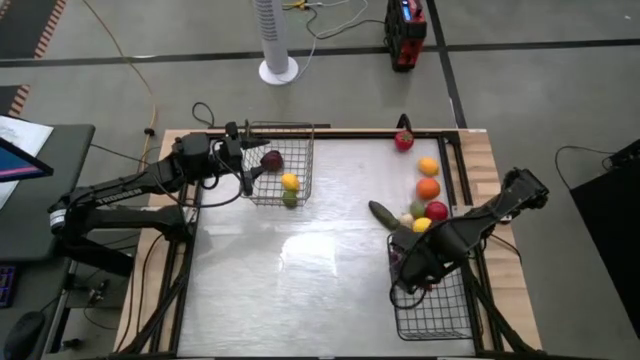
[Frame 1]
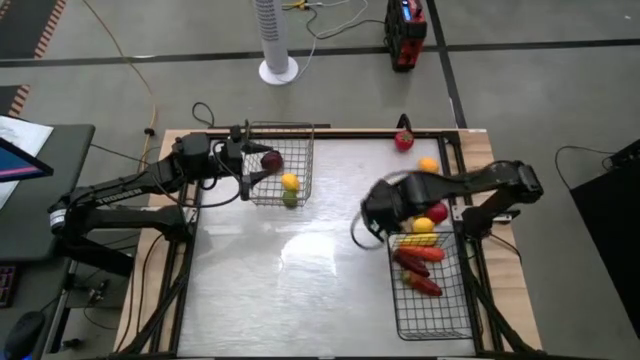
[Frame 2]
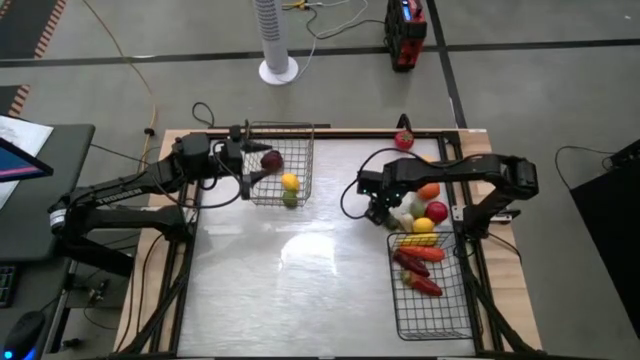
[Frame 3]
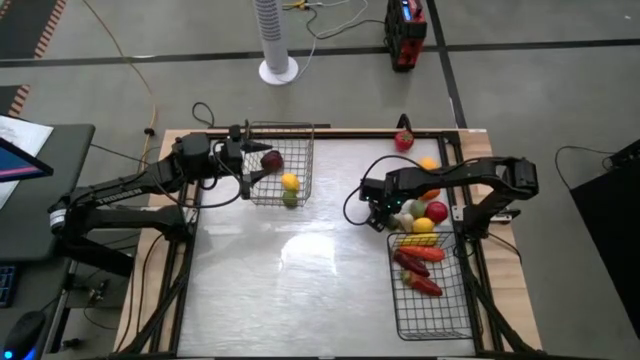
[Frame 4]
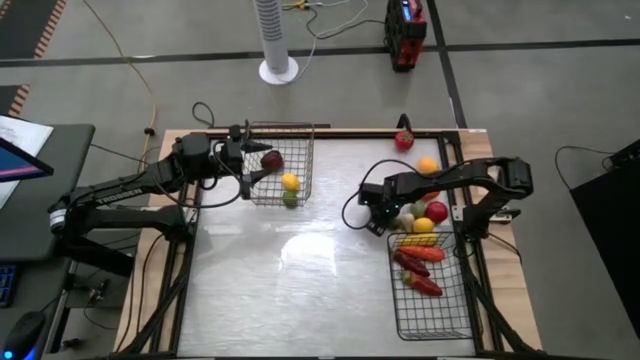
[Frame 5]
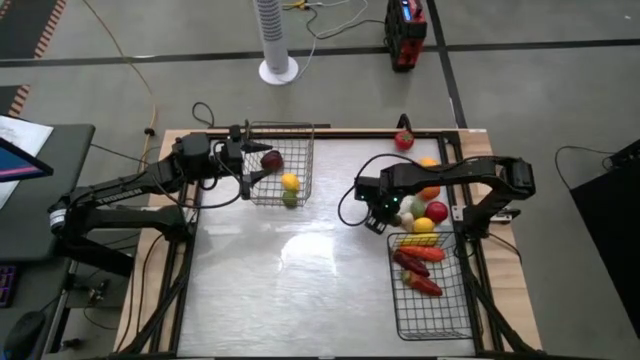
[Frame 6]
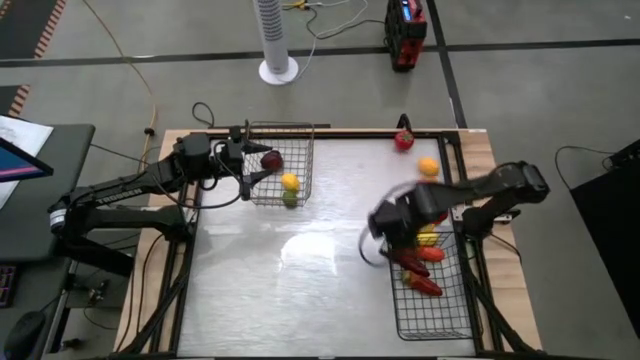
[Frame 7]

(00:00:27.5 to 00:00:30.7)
Task: Sort produce into baskets
Put the green bell pepper into the right wire basket

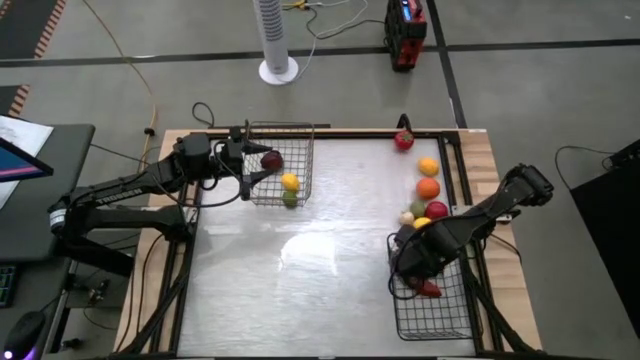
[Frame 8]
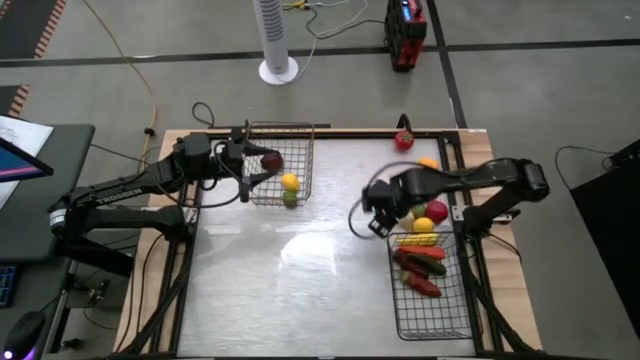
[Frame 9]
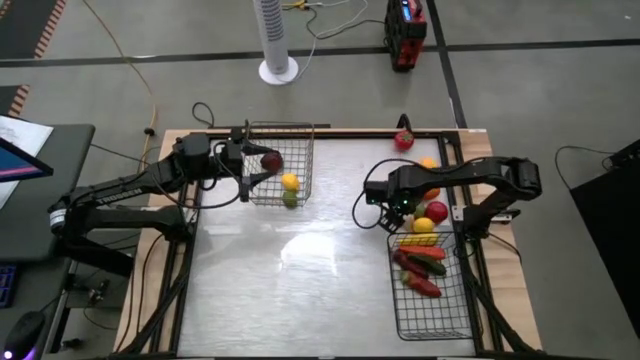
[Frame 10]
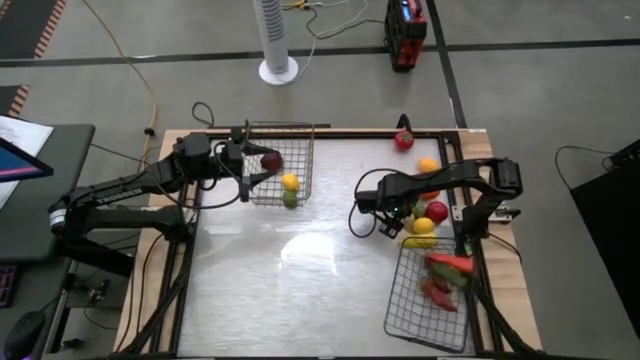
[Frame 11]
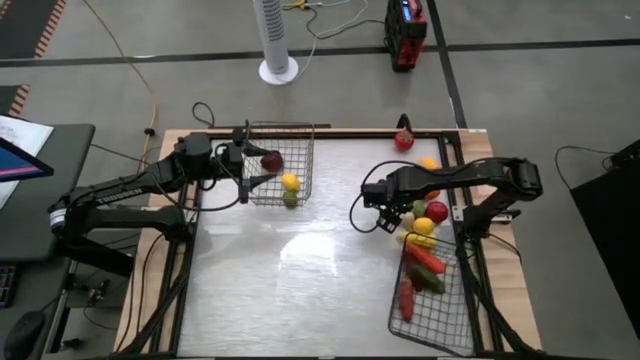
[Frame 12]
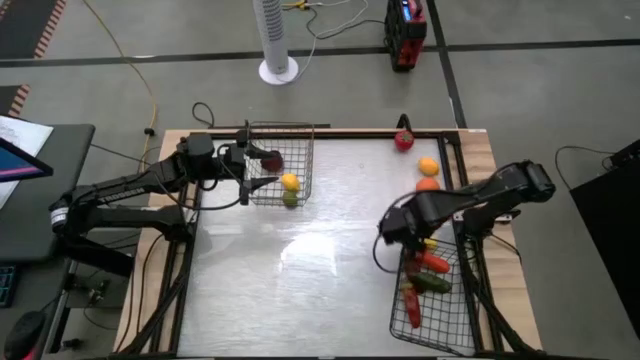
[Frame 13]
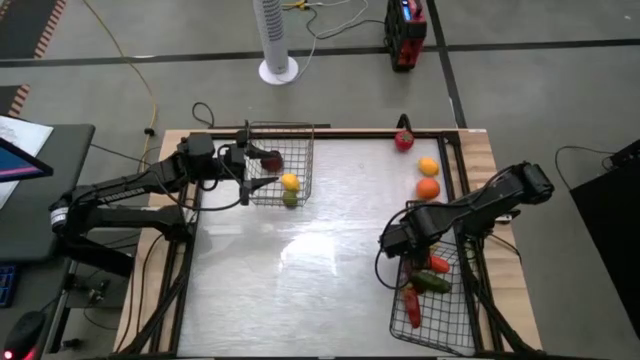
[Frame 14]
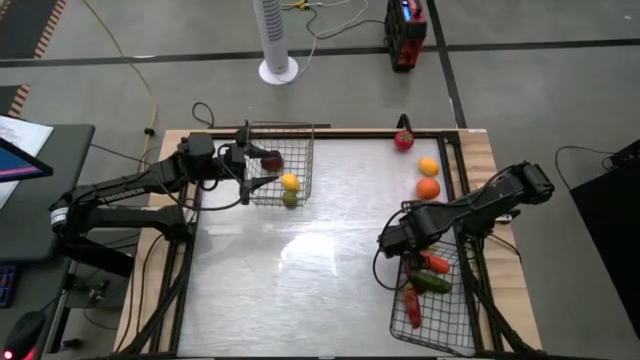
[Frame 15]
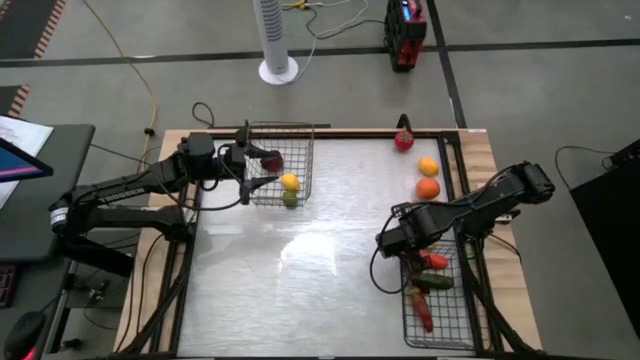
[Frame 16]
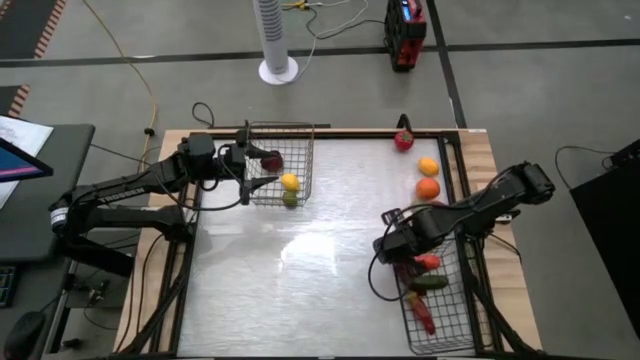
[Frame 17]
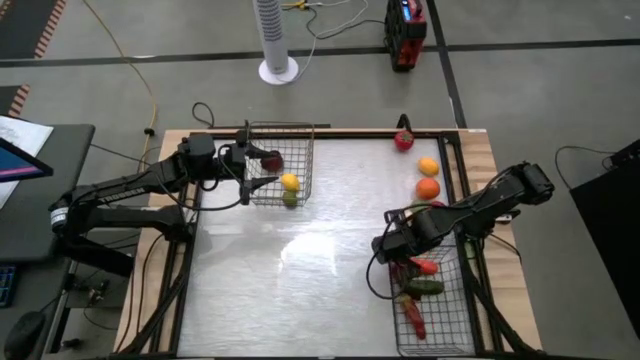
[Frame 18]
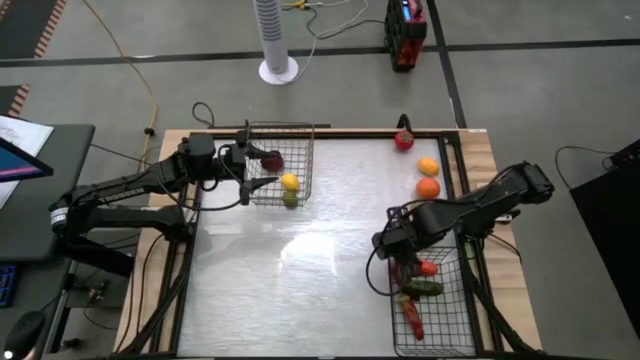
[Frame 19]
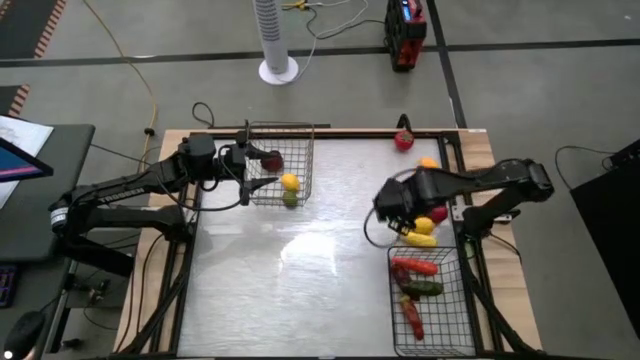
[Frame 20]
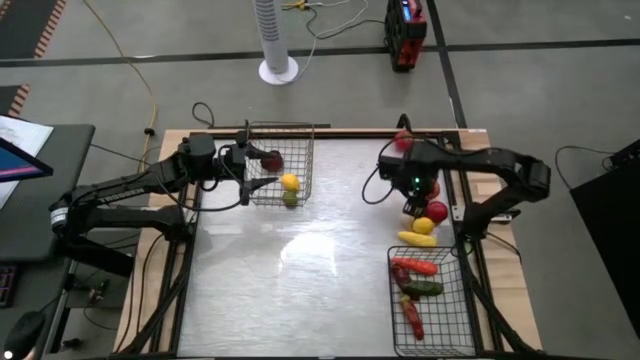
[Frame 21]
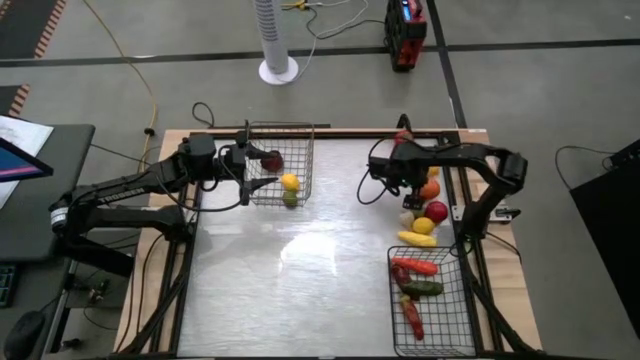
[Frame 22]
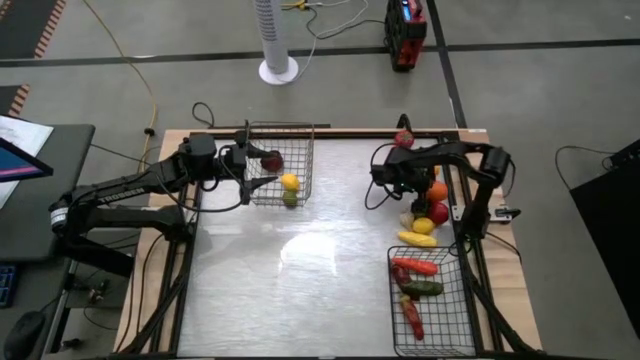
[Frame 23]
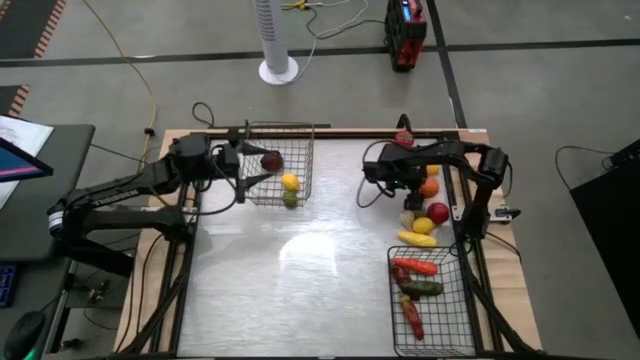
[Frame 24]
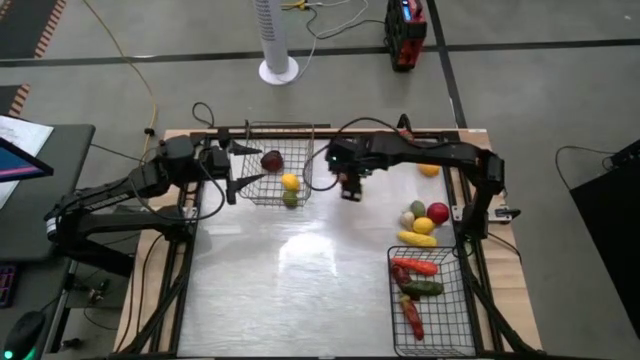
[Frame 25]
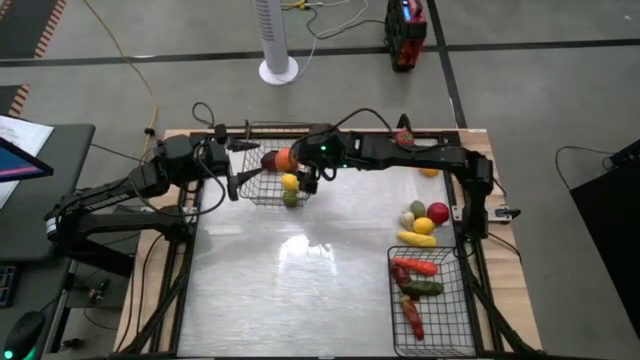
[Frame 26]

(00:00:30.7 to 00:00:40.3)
Put the orange into the left wire basket

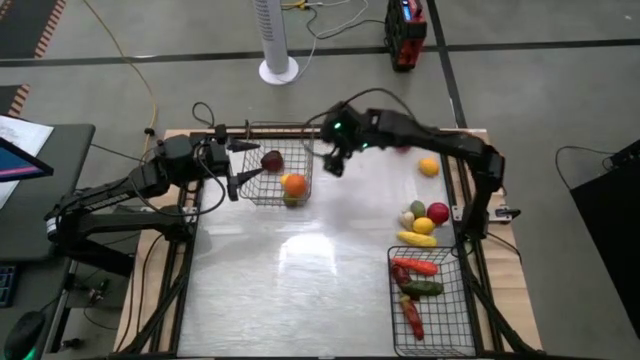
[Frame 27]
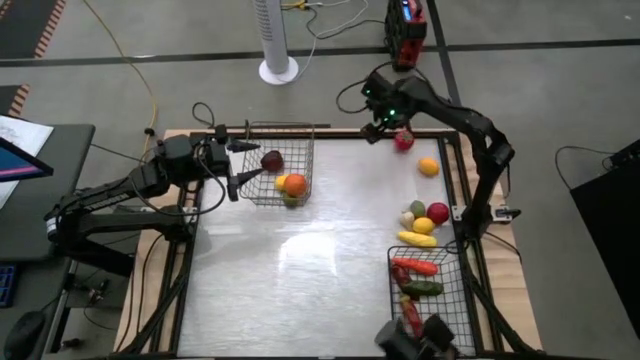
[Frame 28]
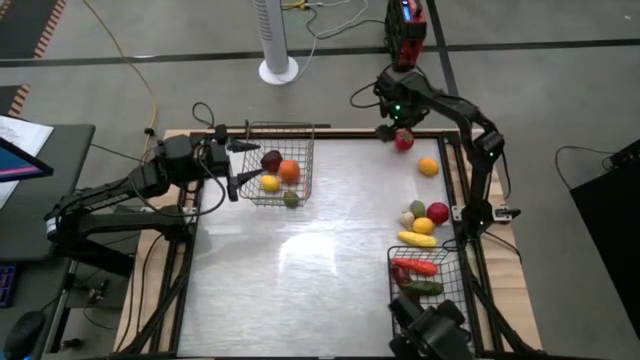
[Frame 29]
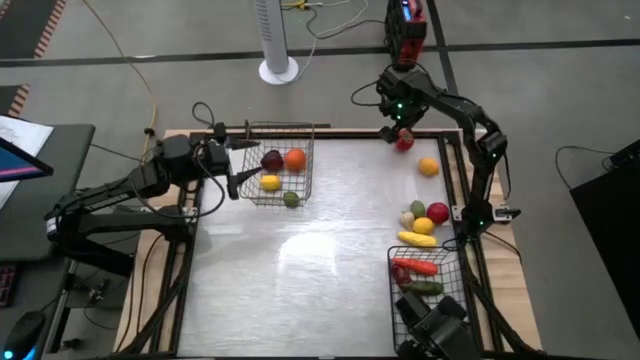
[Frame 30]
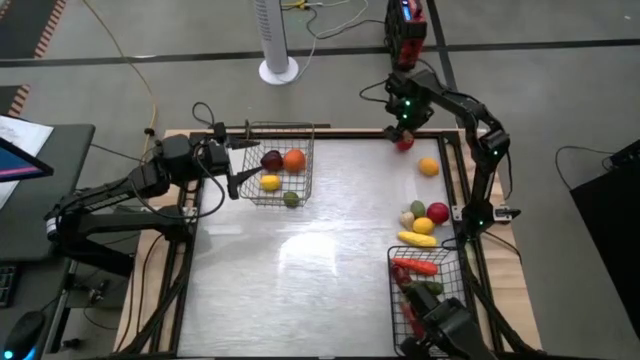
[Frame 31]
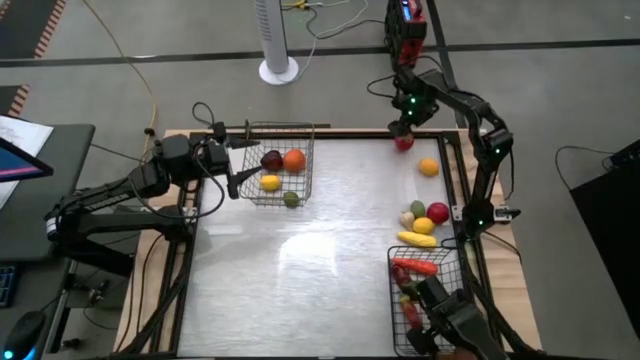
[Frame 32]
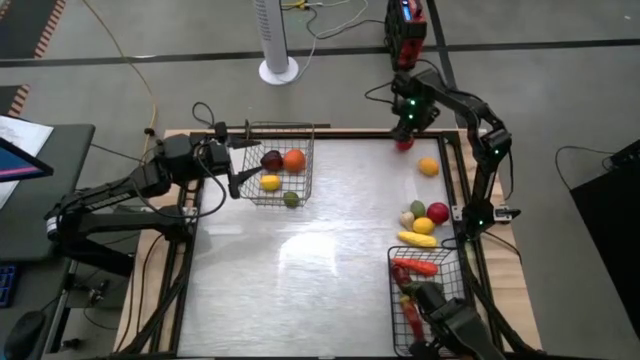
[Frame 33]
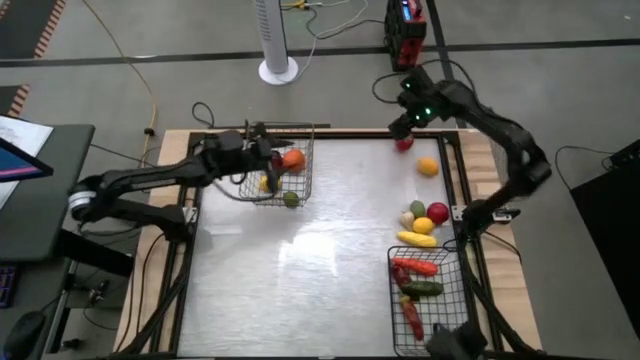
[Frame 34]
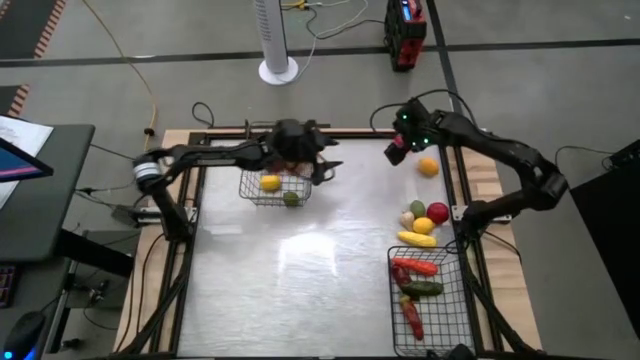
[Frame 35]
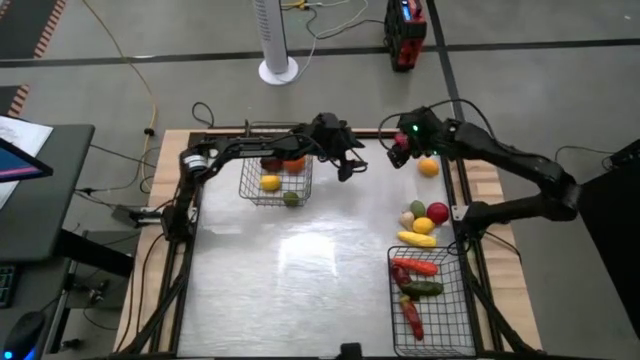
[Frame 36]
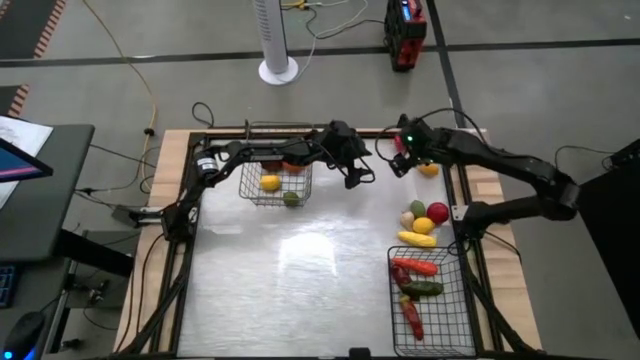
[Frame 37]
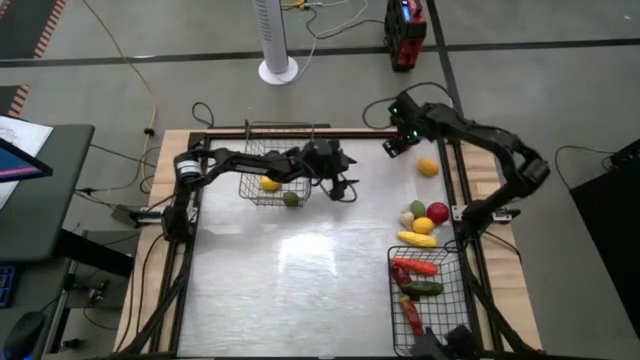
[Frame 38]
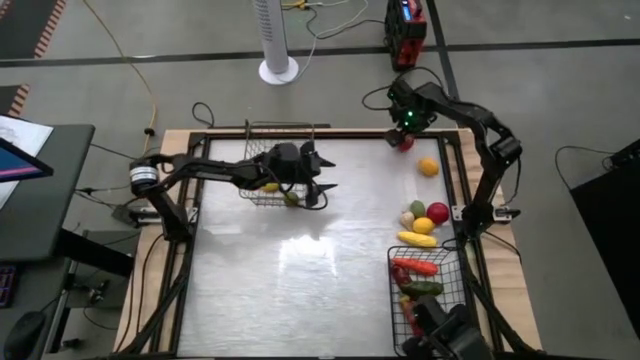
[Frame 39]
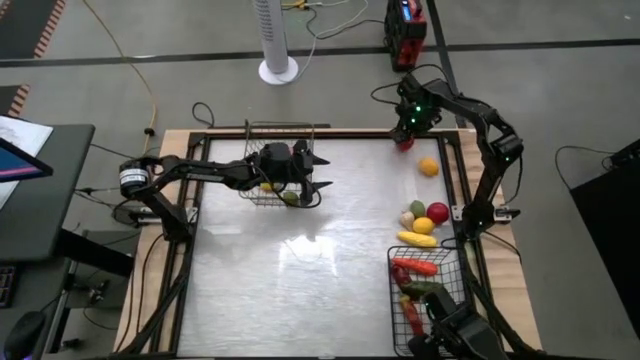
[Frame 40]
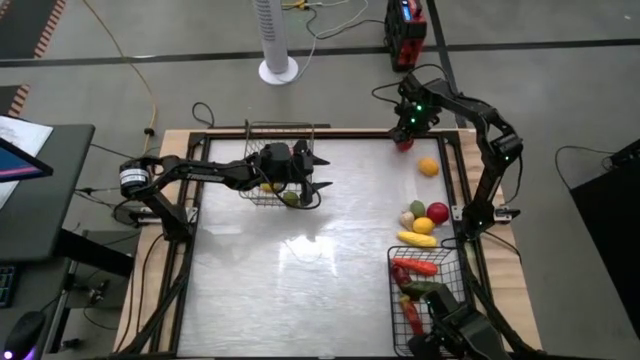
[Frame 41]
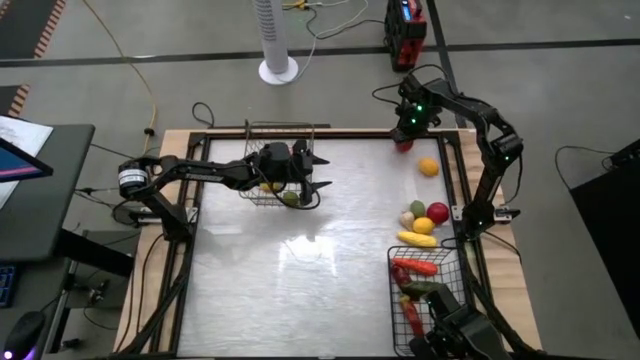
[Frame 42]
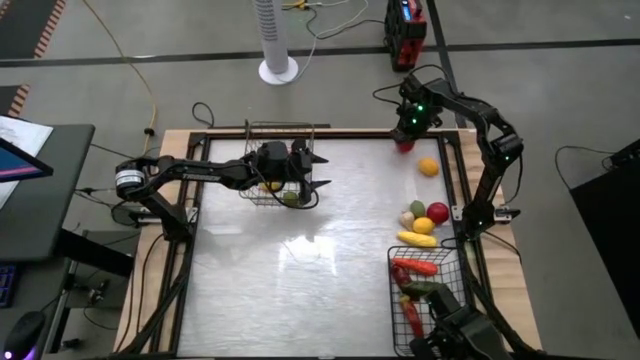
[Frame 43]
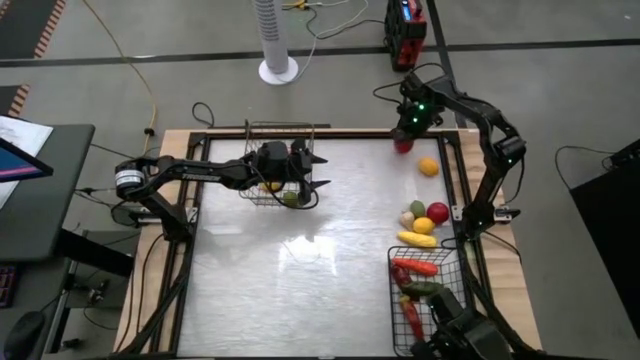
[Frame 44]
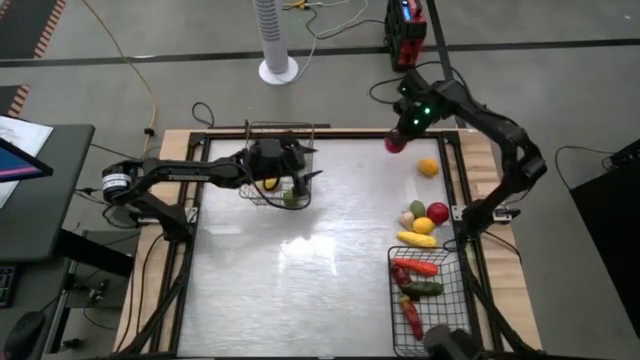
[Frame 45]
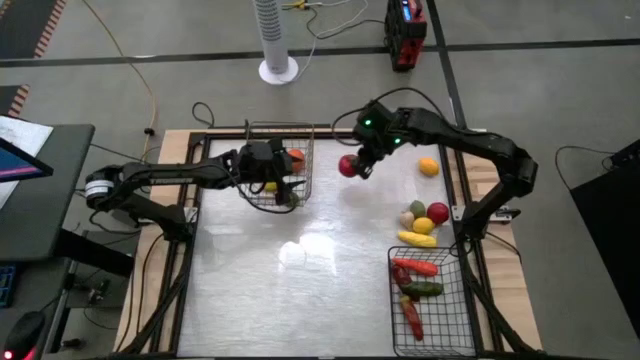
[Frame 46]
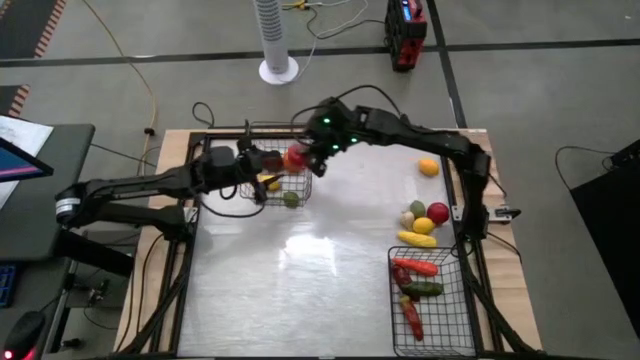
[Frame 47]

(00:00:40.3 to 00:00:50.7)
Put the top tomato into the left wire basket
